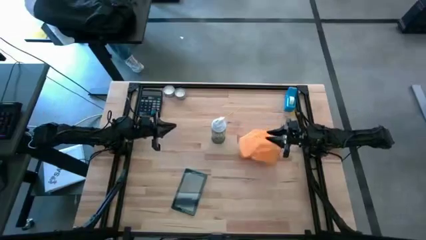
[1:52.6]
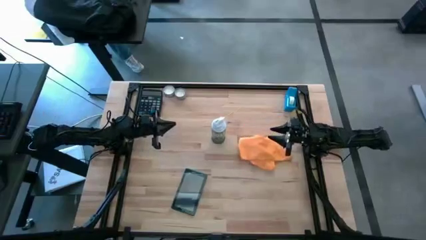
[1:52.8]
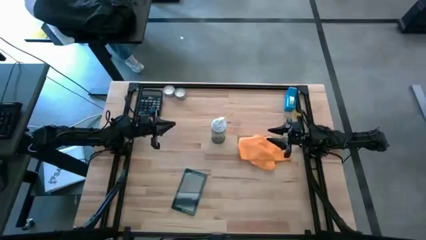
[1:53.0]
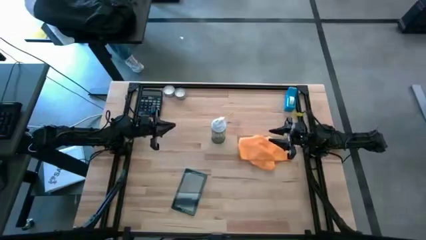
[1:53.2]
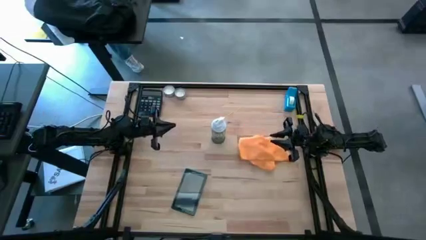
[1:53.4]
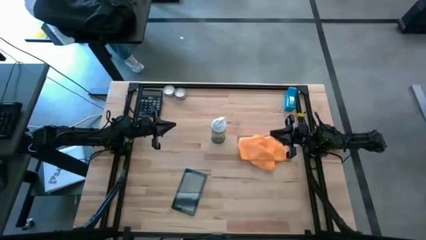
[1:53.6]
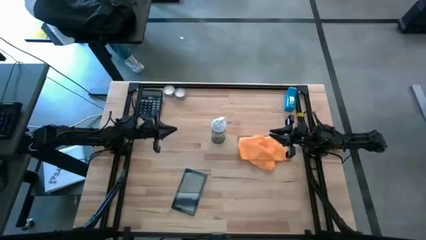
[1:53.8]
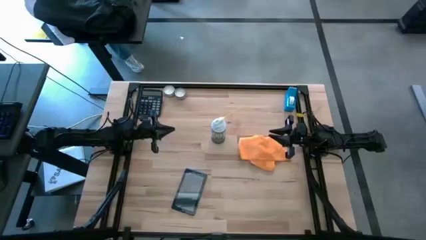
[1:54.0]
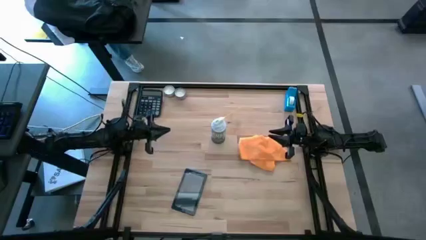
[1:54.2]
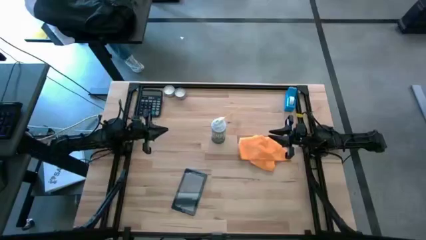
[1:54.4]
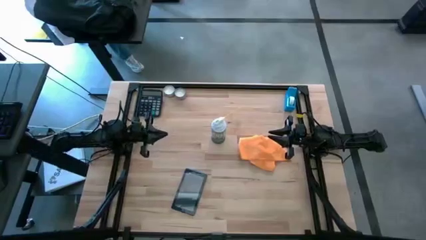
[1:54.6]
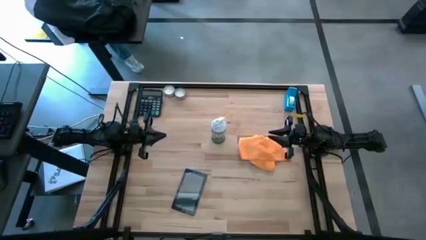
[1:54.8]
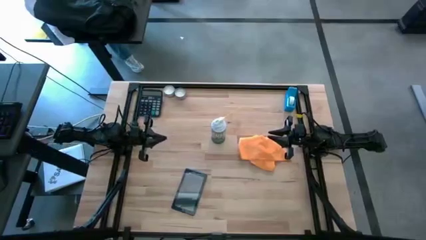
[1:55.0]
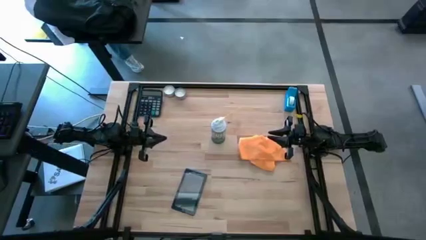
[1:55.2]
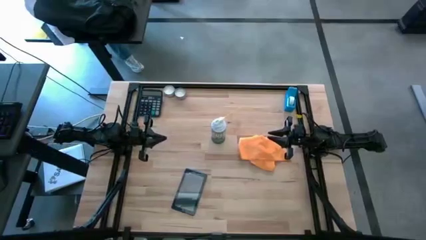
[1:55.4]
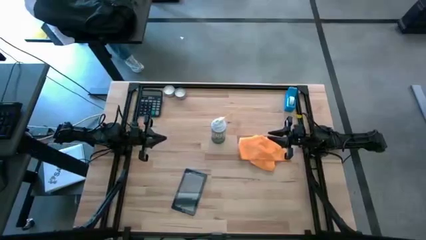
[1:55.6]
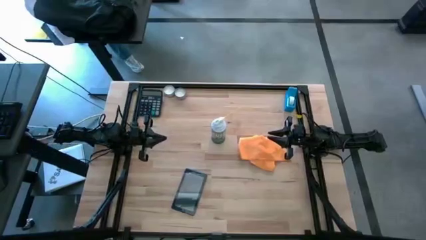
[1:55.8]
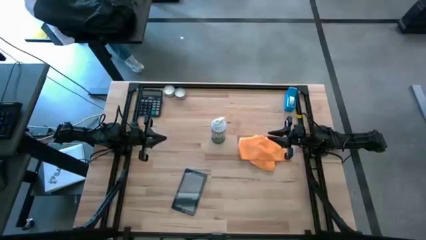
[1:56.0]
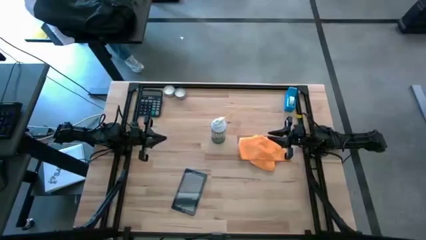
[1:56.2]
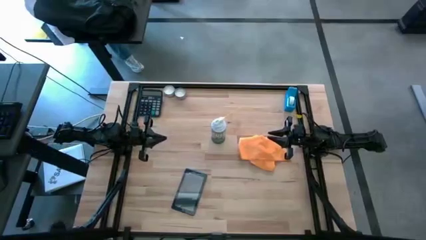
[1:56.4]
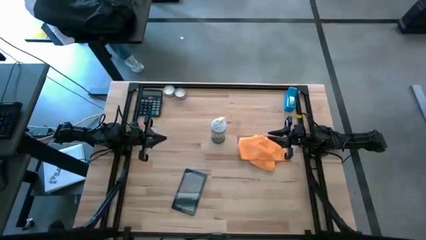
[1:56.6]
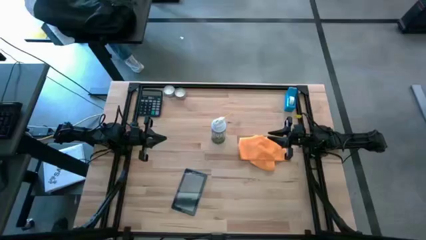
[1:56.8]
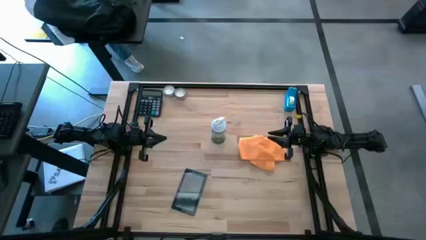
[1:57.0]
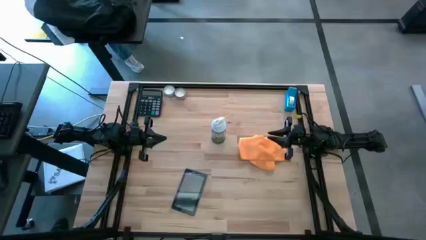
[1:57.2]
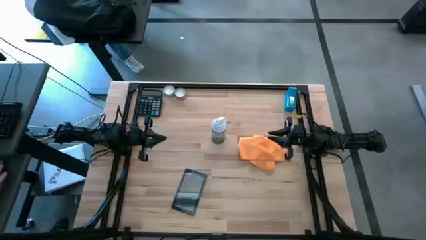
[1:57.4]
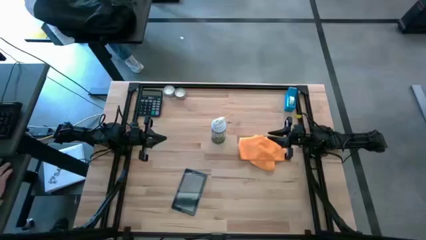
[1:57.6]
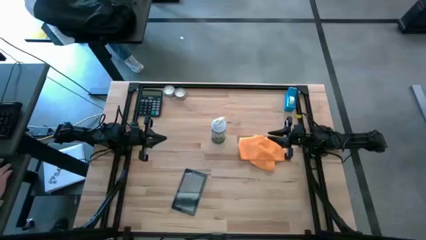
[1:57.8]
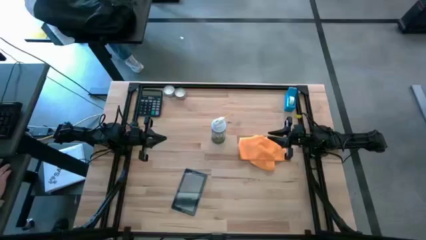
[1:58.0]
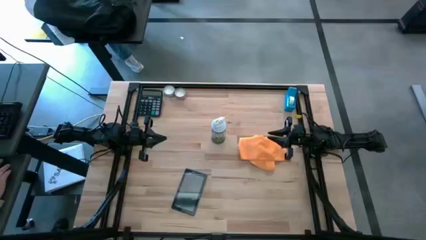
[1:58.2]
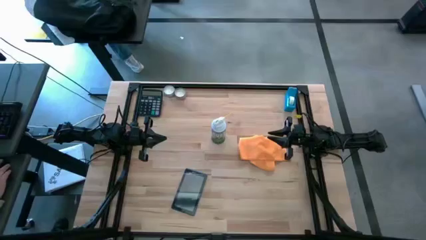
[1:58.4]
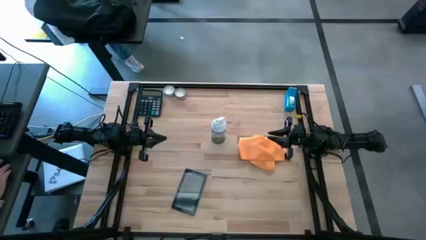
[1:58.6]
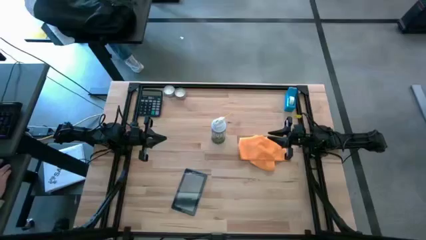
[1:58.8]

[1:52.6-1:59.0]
Task: Apply microfiber cloth
Return to Home Position

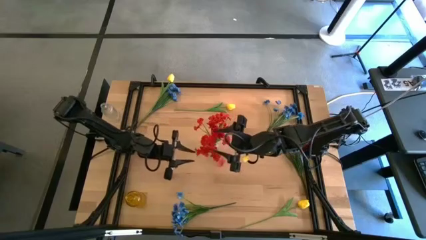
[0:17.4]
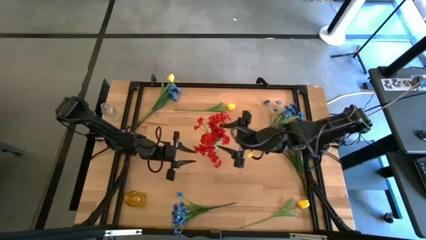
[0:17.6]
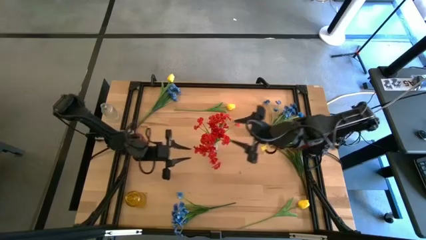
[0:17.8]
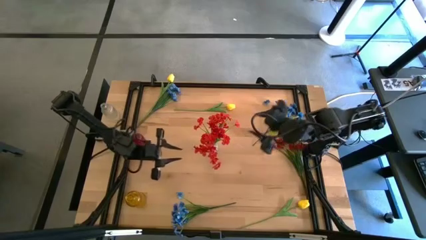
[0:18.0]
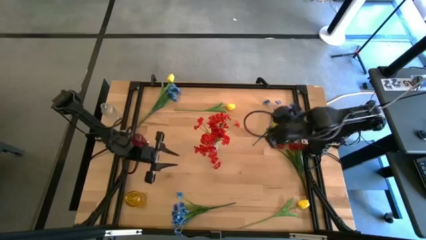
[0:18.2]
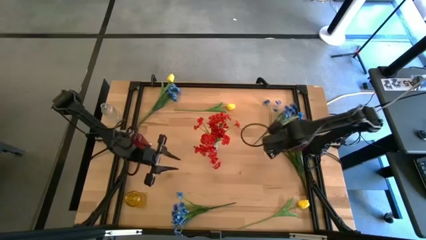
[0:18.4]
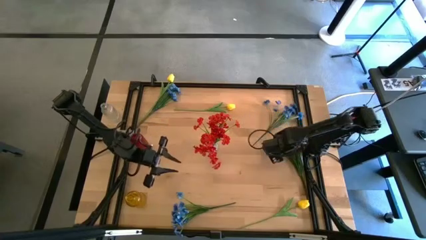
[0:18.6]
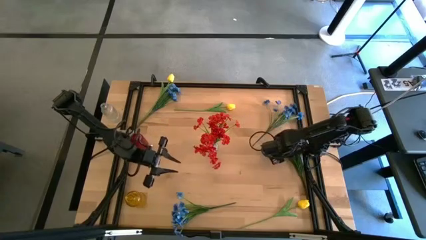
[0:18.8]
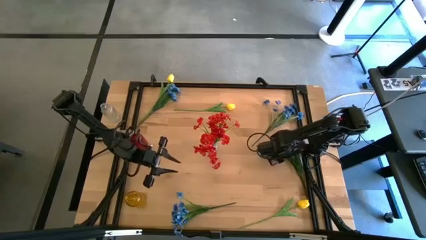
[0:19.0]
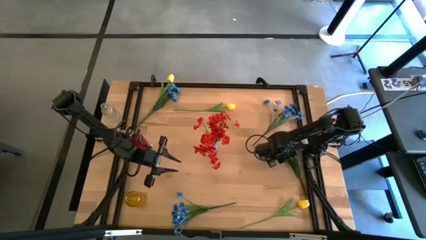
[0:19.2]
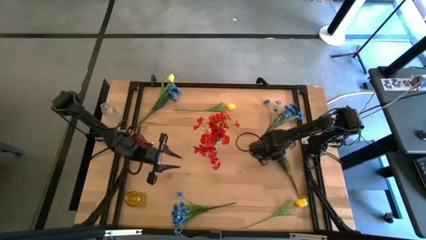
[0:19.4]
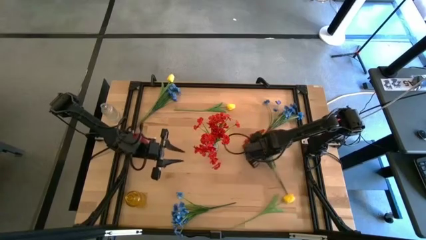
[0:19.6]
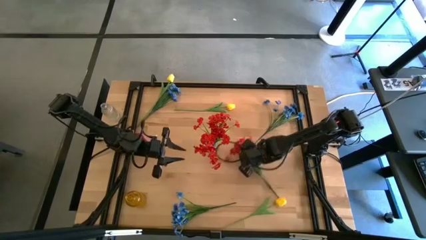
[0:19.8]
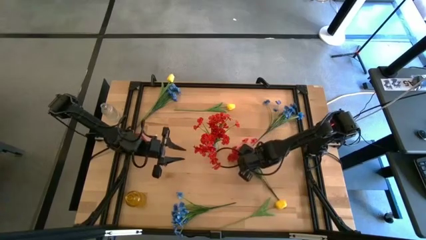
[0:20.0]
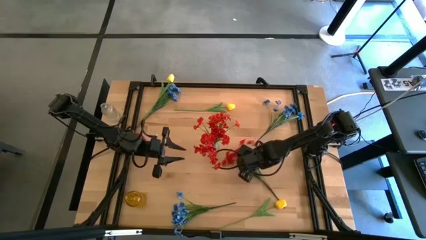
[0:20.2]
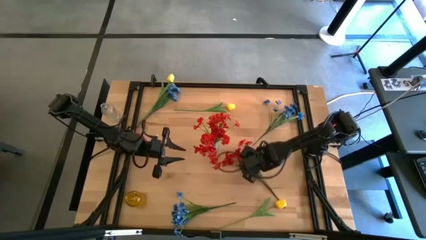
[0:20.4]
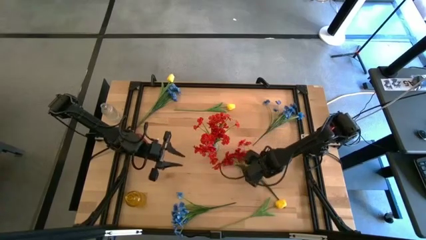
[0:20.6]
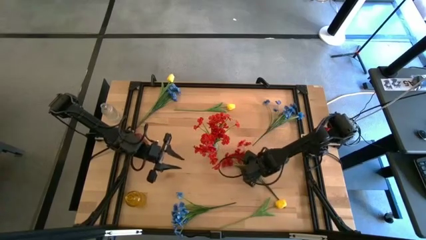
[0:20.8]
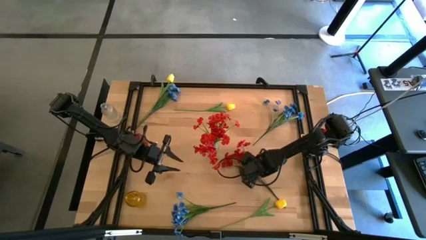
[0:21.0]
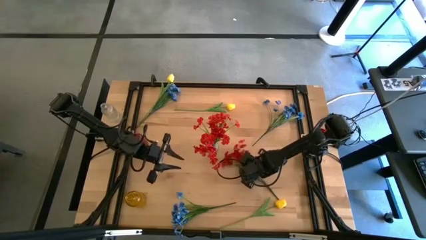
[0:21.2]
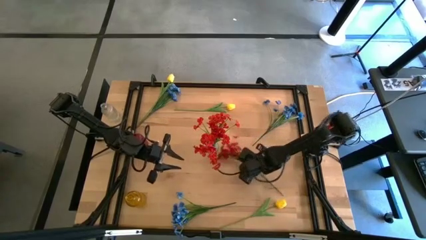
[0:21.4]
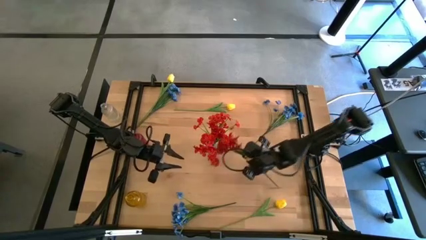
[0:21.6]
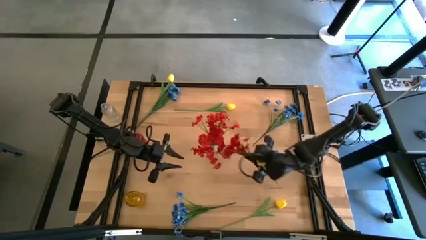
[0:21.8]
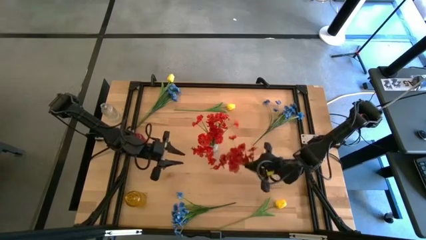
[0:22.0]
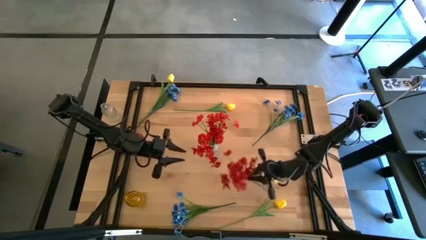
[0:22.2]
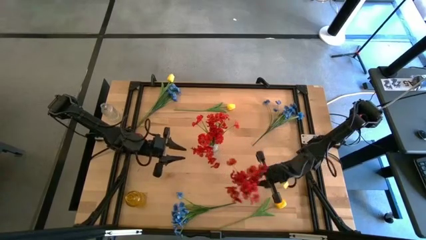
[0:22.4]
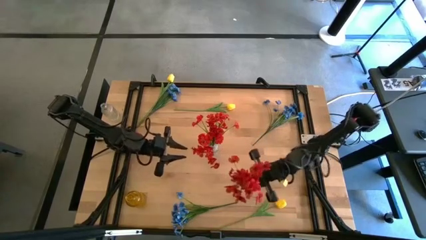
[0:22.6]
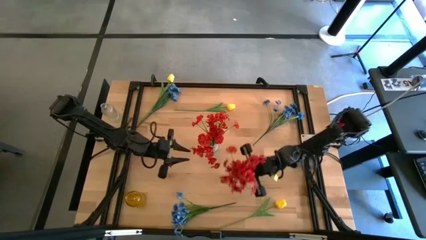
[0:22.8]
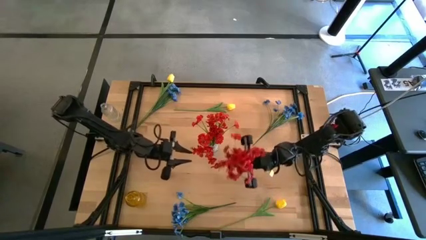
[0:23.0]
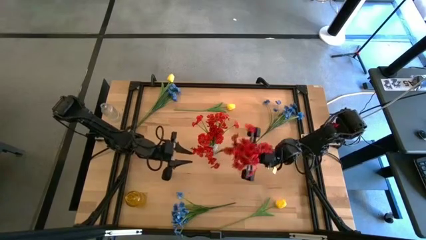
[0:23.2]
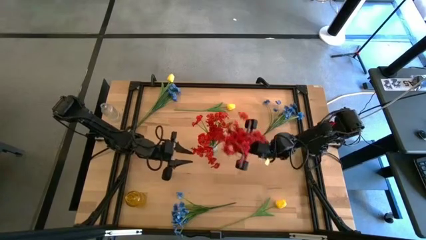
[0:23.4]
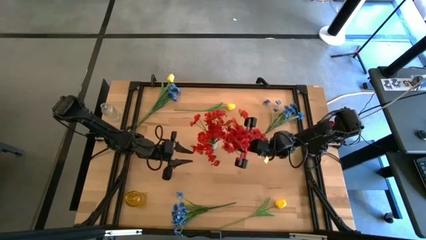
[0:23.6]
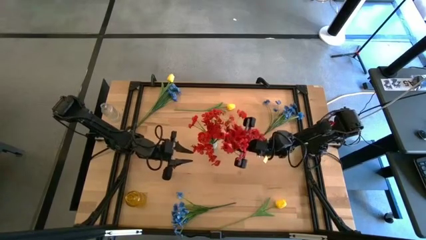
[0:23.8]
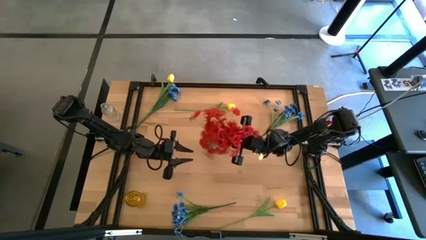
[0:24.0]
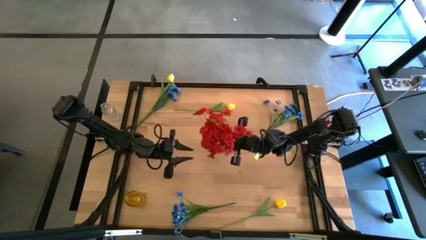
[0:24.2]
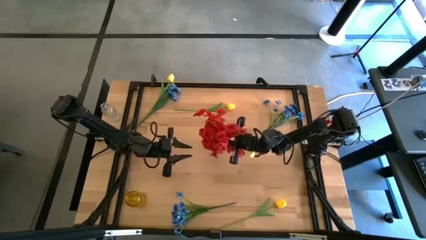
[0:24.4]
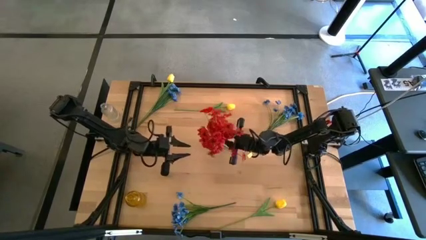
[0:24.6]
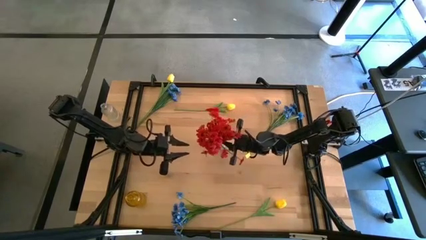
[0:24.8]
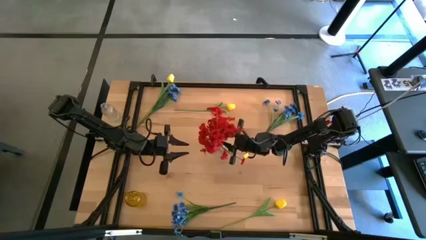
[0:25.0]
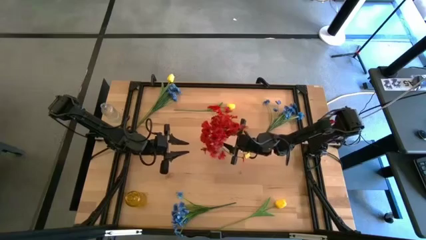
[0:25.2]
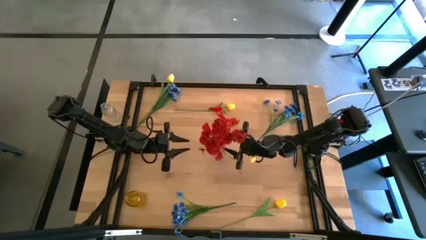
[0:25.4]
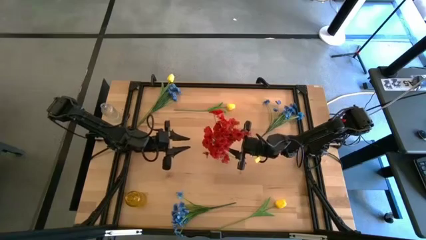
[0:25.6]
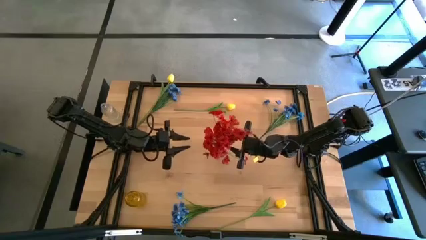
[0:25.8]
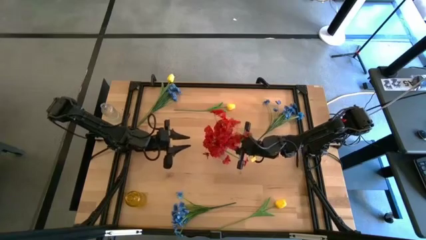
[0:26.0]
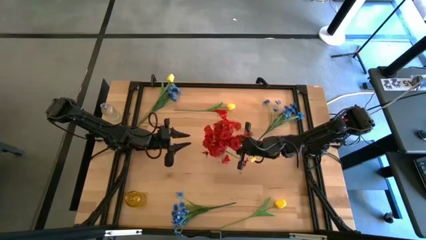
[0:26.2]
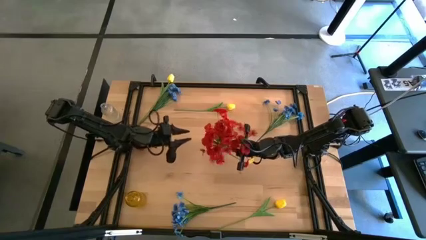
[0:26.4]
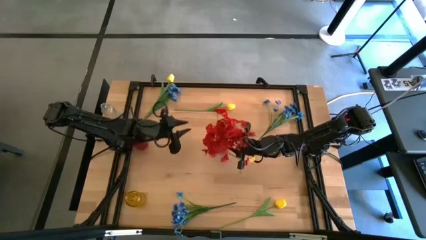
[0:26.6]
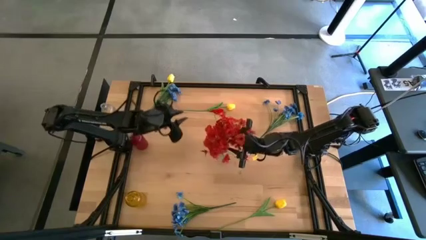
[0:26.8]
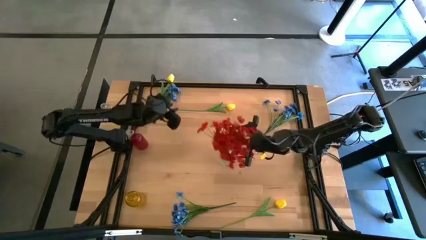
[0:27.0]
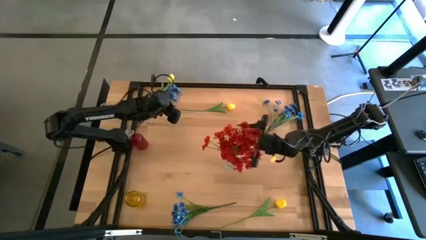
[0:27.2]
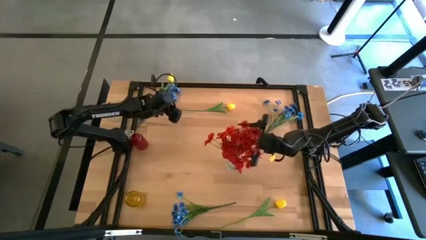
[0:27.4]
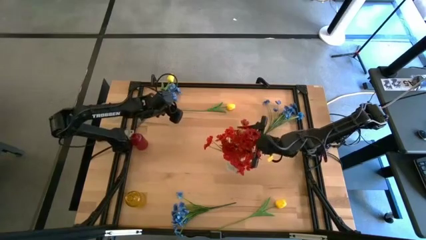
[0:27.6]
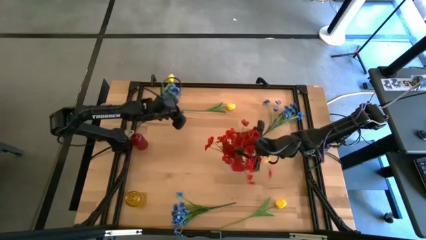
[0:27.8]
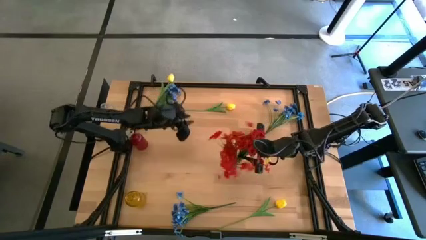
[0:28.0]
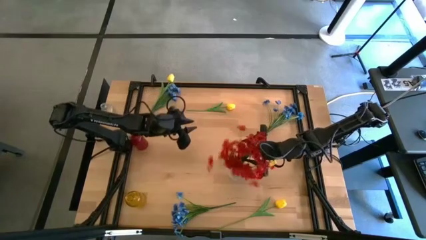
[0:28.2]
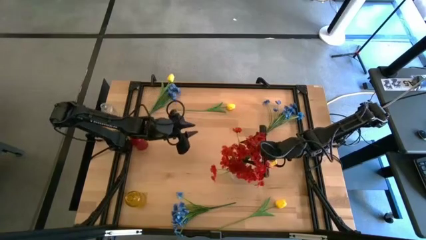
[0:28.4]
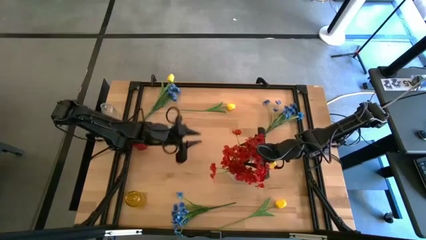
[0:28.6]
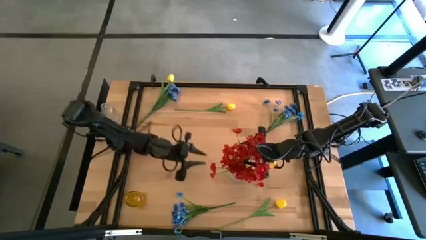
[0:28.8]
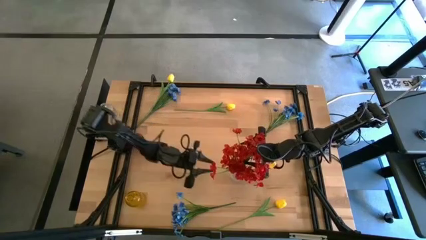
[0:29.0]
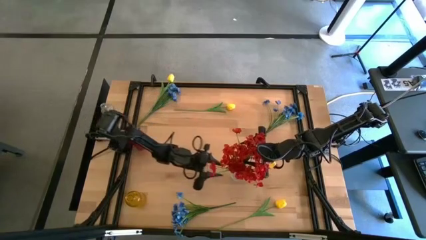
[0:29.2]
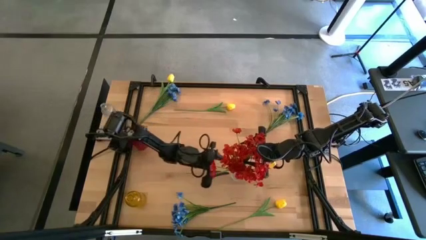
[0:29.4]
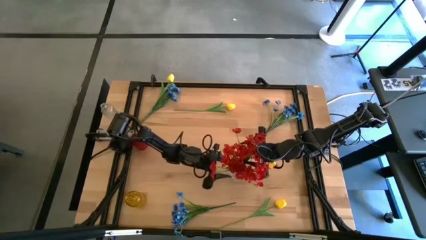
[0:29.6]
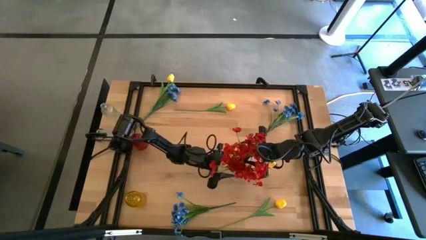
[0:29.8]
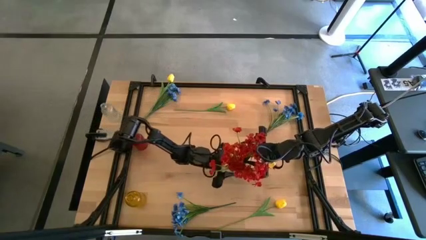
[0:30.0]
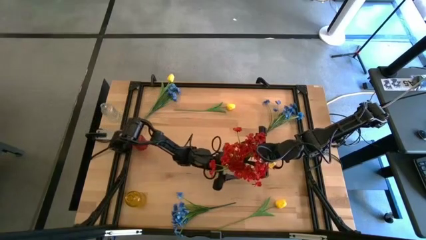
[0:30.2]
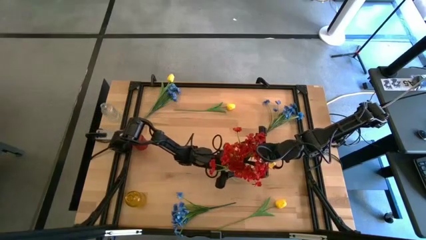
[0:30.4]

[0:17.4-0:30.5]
Task: Sort flowers into vase by color
Put the red flower into the transparent vase
